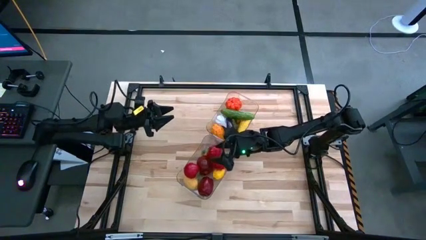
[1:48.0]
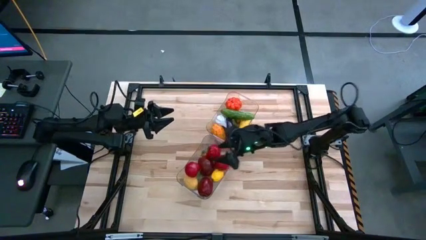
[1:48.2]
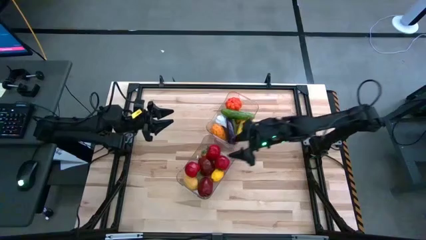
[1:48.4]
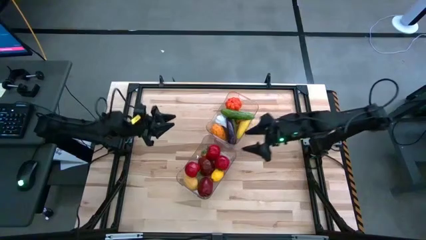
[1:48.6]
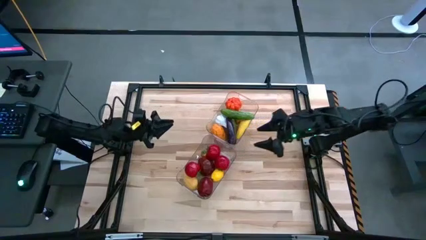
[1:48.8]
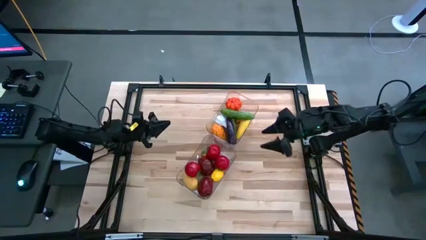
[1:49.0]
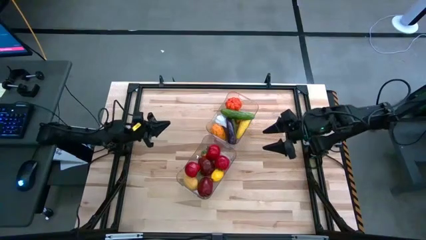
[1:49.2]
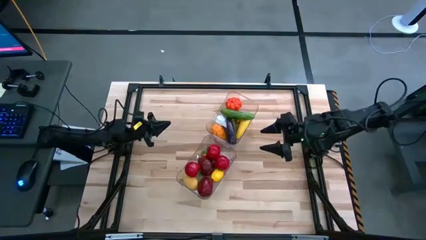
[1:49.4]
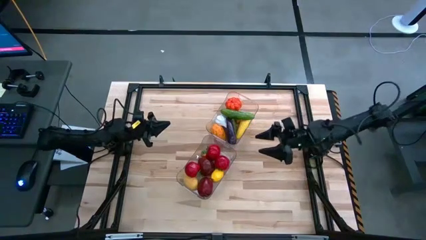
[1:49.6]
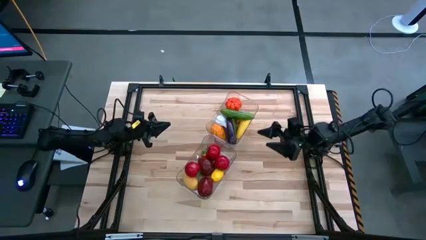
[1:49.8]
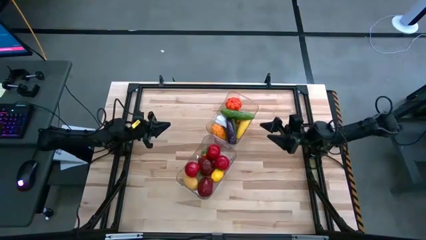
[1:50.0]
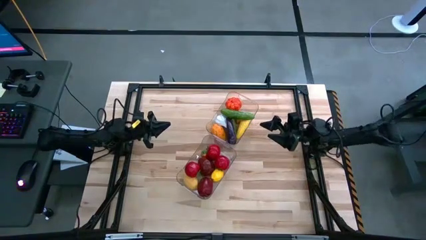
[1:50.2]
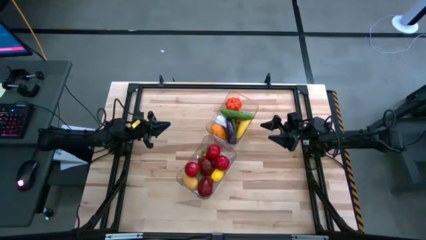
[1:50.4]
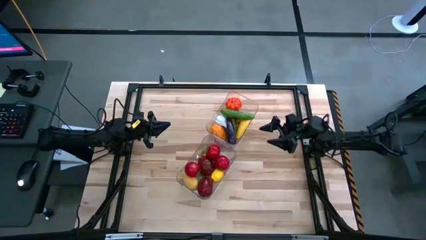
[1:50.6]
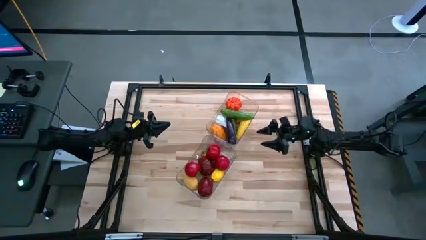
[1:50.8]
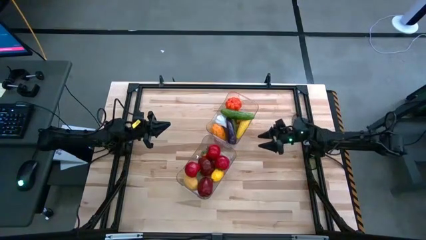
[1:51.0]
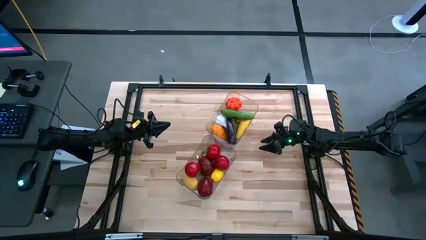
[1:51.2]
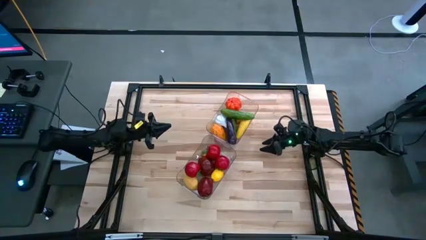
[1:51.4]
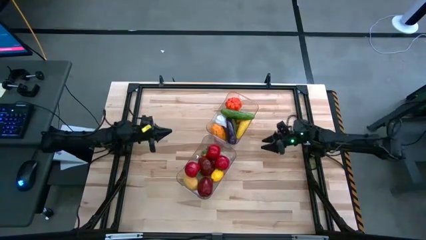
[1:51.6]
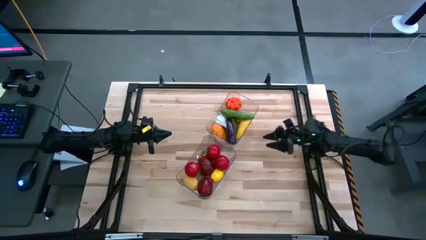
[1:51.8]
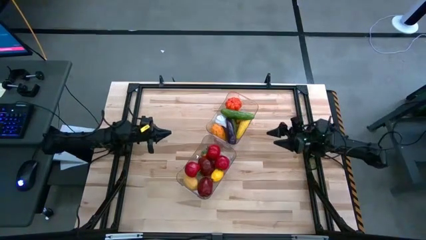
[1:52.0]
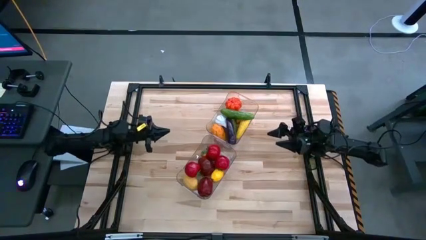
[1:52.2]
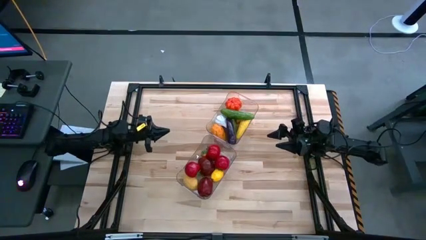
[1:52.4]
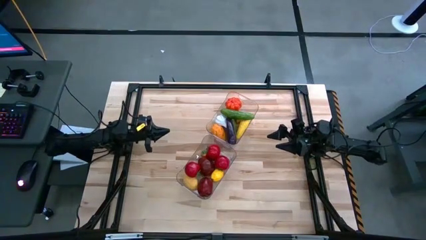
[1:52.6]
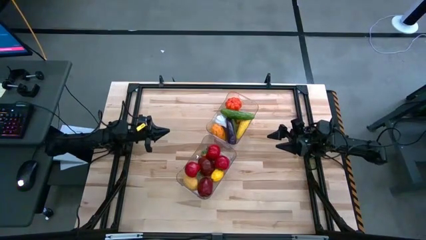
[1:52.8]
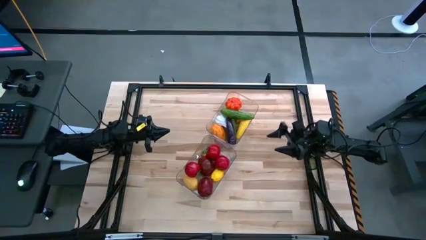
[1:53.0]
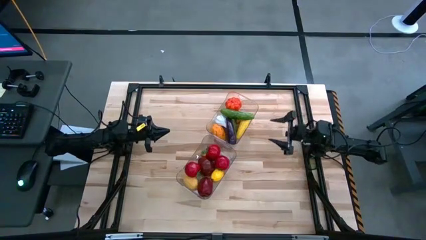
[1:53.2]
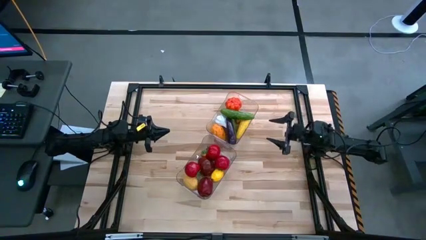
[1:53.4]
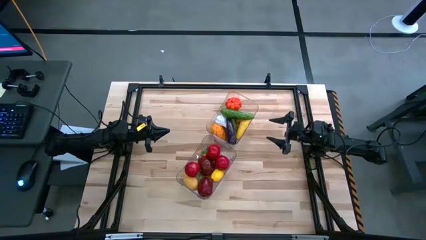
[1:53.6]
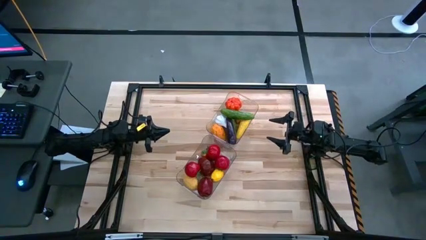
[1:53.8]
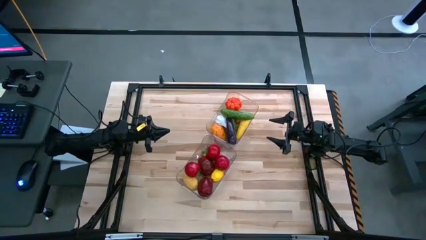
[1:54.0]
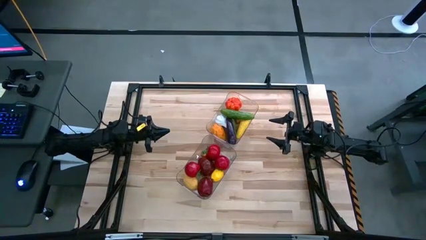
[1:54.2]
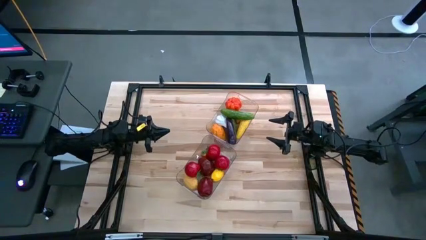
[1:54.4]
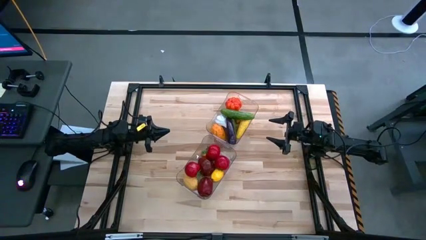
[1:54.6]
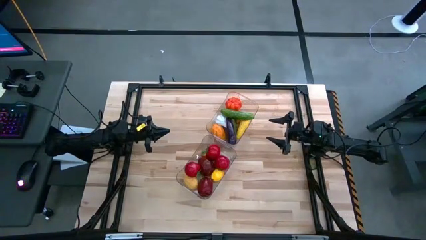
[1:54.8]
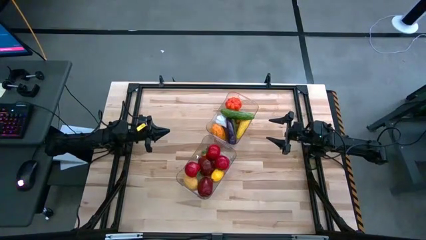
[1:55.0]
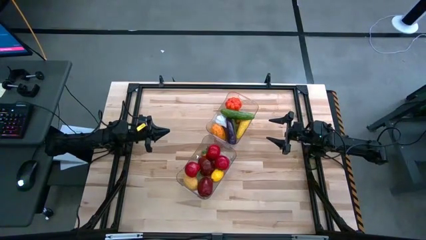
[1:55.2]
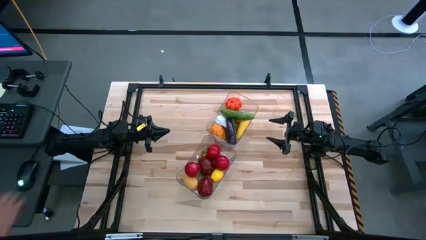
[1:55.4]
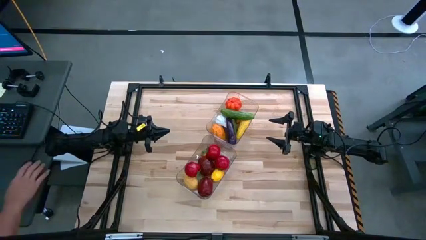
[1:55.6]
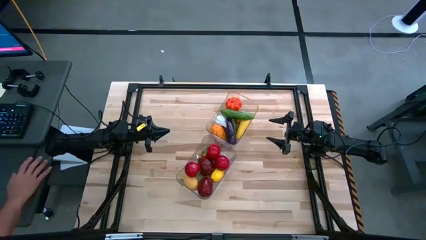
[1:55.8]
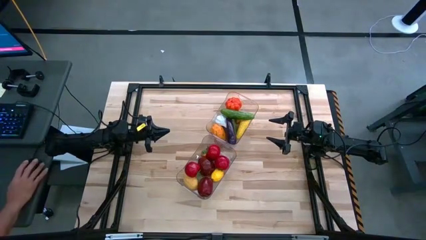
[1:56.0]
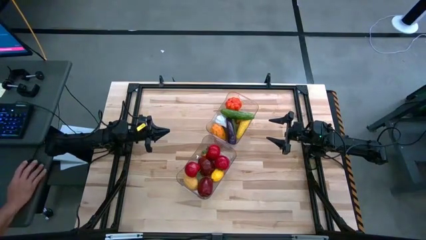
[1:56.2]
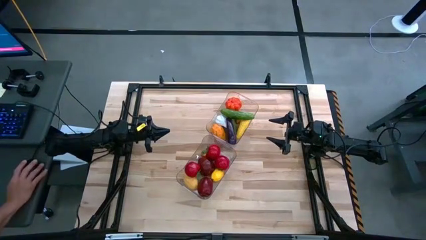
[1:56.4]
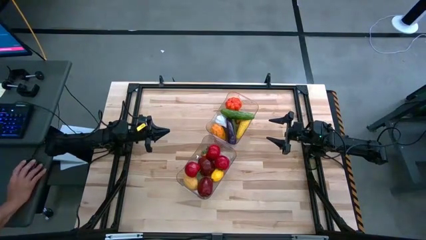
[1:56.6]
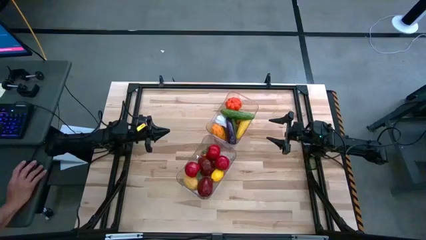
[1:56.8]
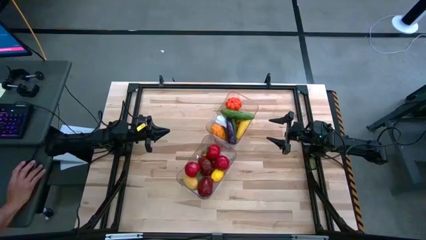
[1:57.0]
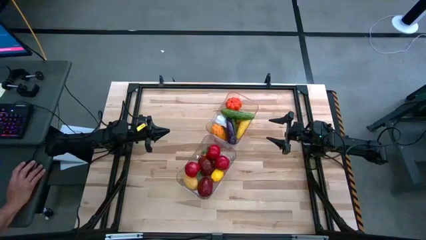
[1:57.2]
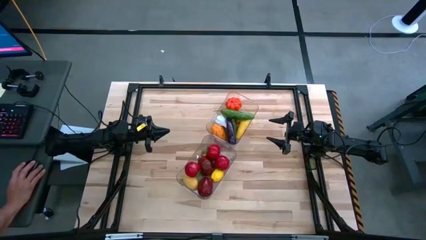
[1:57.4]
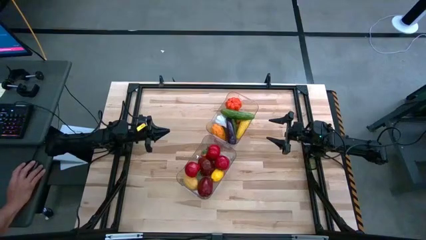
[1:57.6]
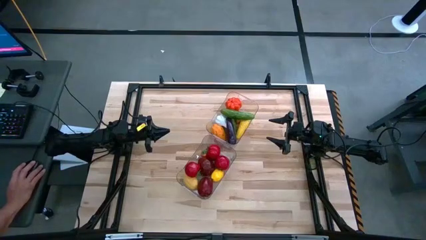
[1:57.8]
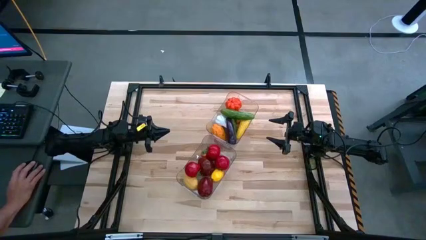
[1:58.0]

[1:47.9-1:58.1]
Task: Sort produce into baskets
Return to Home Position

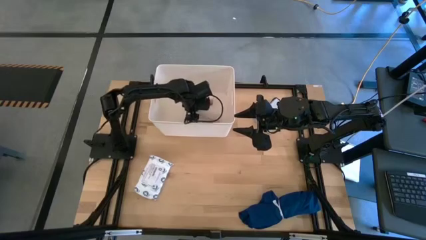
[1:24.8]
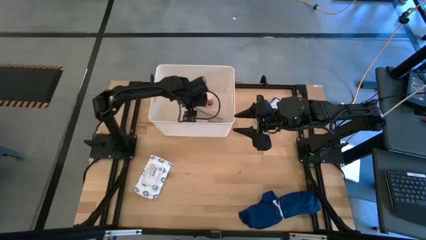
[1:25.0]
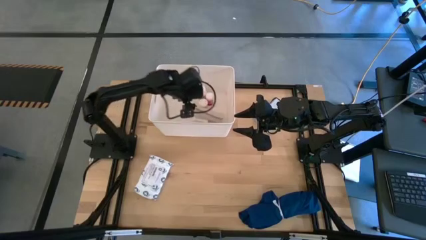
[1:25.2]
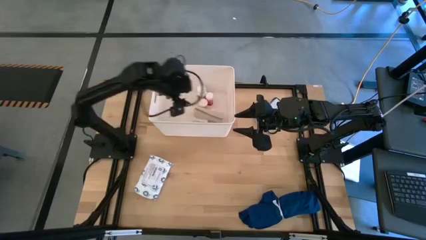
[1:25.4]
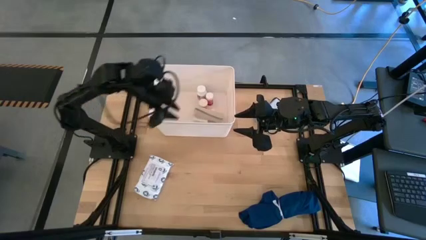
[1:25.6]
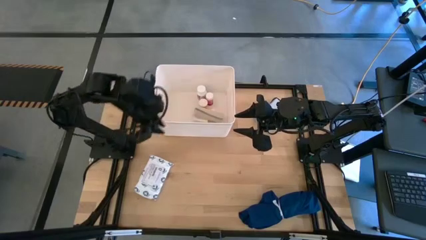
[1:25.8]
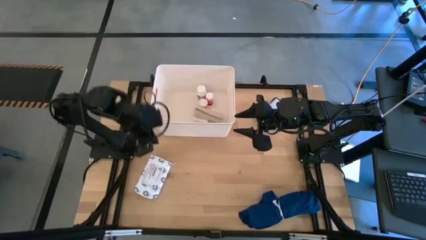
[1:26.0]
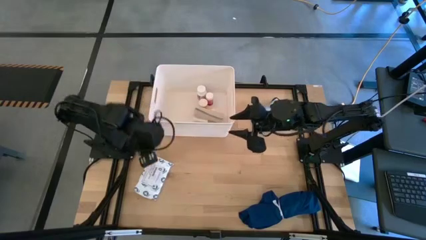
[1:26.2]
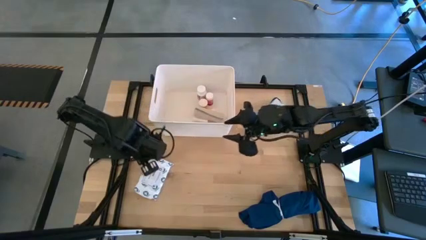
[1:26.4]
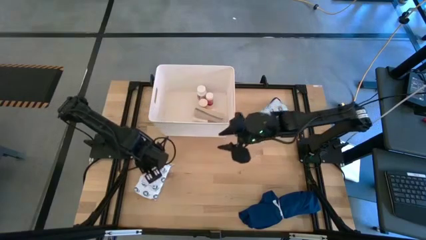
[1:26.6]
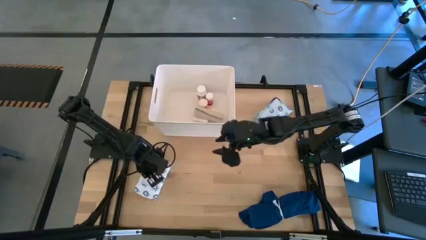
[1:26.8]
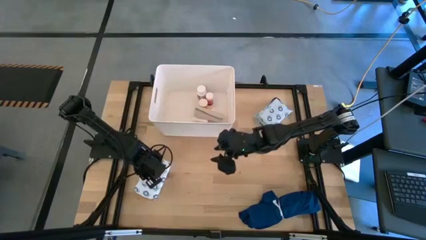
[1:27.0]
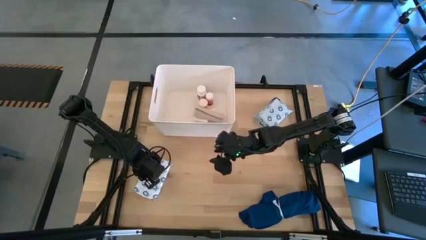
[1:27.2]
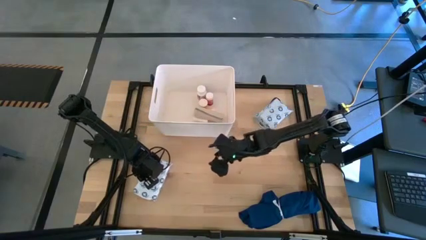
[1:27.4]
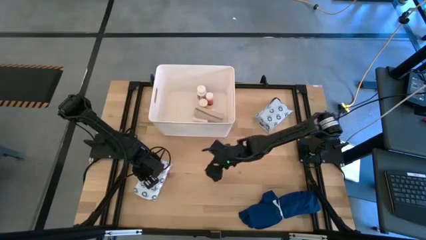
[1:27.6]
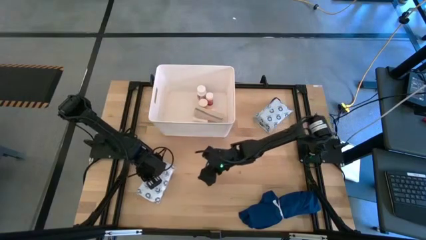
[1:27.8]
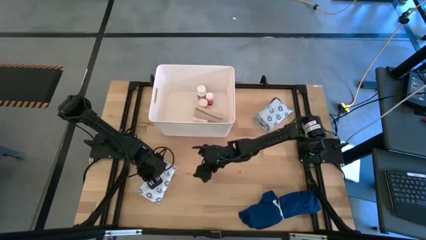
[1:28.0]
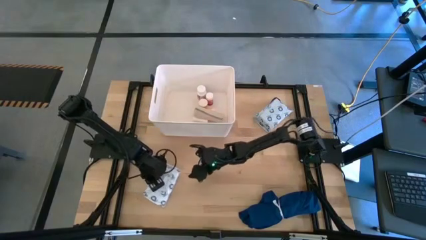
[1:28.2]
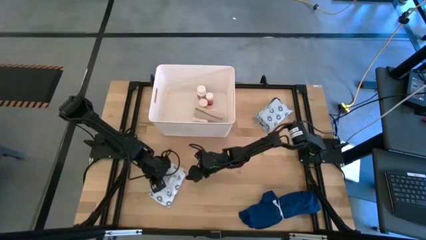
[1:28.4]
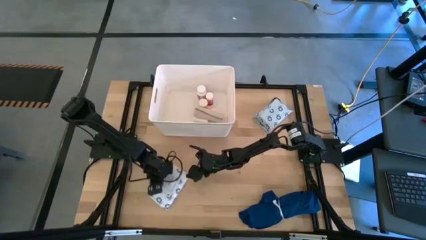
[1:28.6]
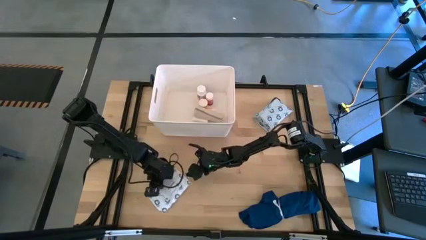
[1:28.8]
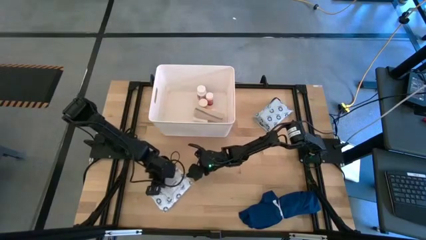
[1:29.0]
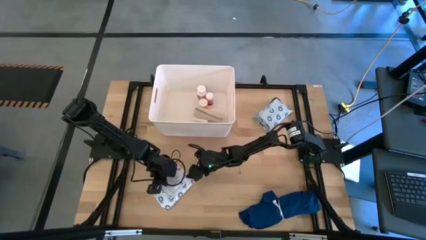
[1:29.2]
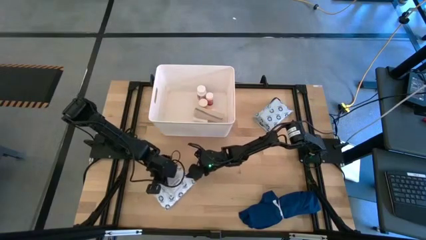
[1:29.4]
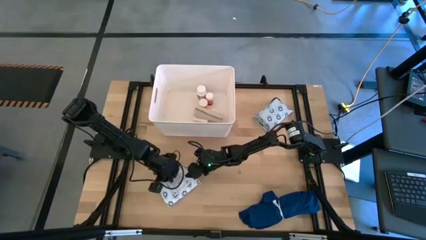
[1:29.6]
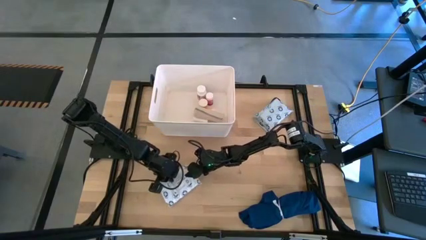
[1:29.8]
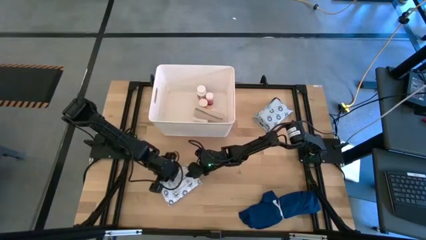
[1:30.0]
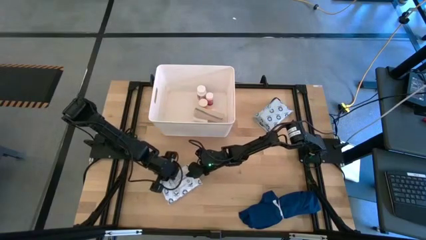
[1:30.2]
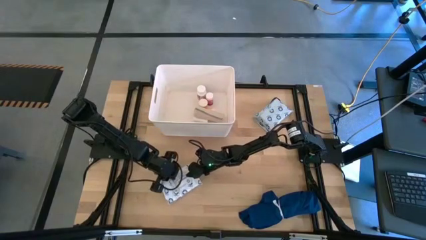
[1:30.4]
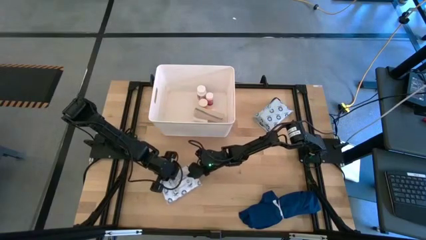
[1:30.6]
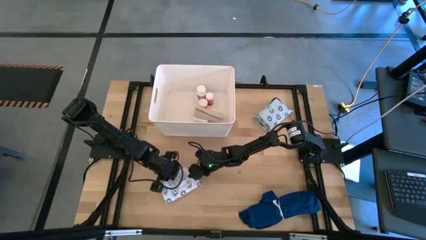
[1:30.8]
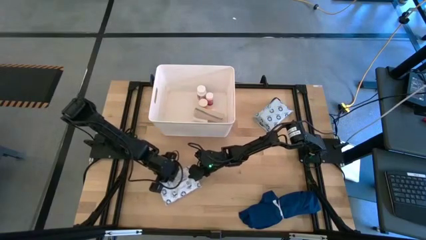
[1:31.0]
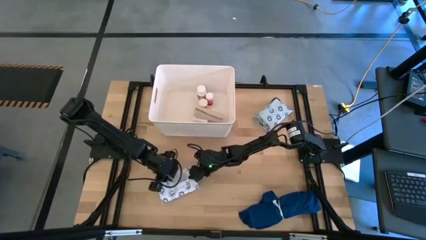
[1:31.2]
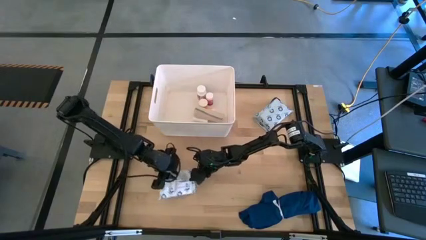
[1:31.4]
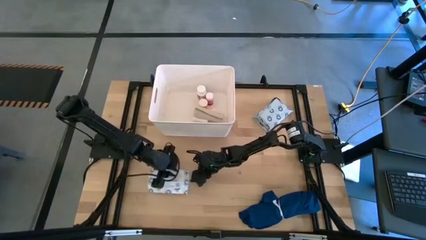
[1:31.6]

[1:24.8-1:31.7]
Task: Pick & place medical supplies in basket/bin
Put the bottom mailer bag into the white bin
